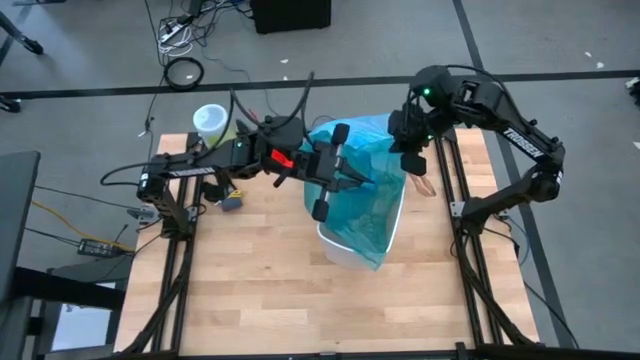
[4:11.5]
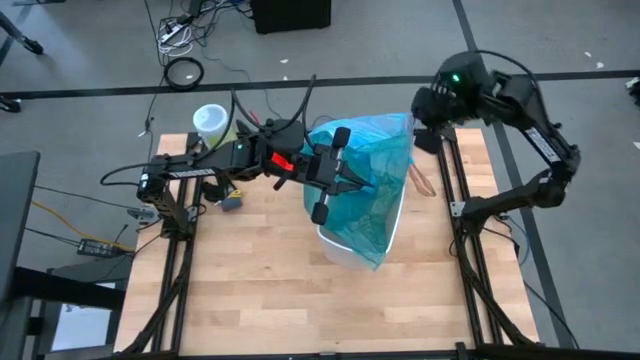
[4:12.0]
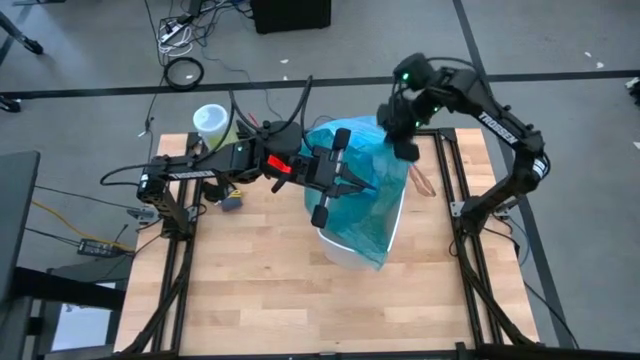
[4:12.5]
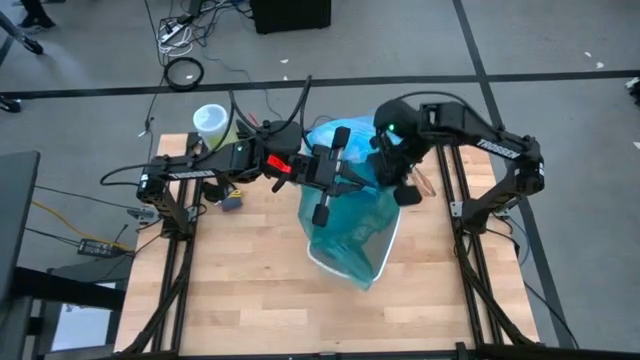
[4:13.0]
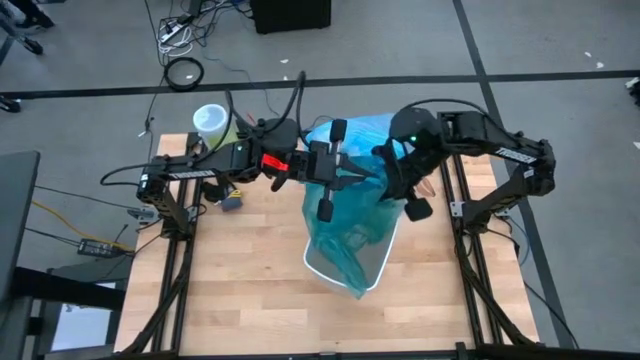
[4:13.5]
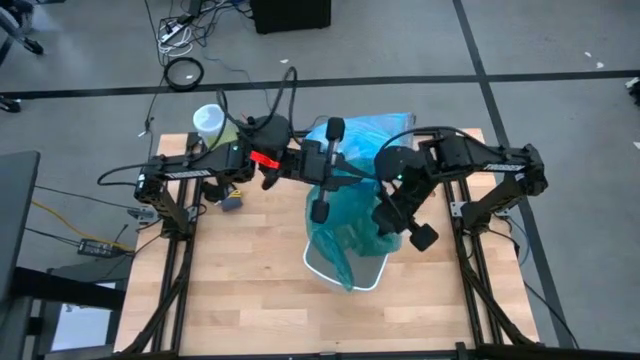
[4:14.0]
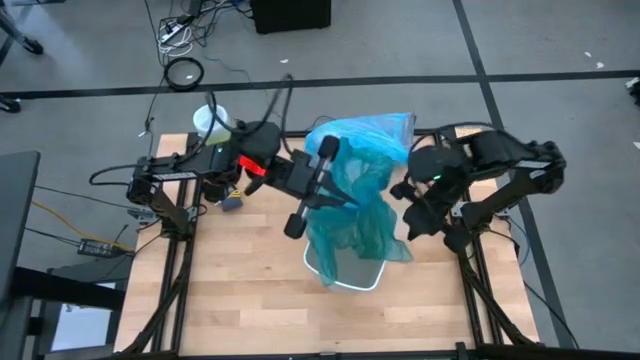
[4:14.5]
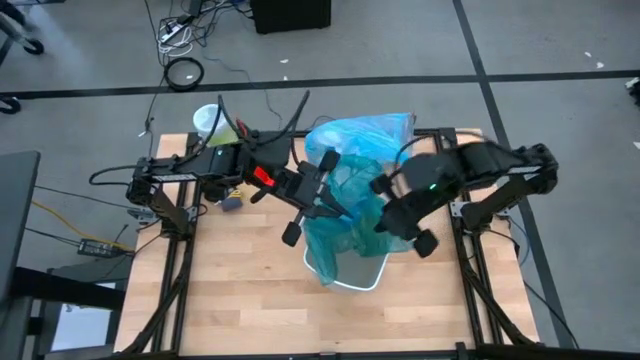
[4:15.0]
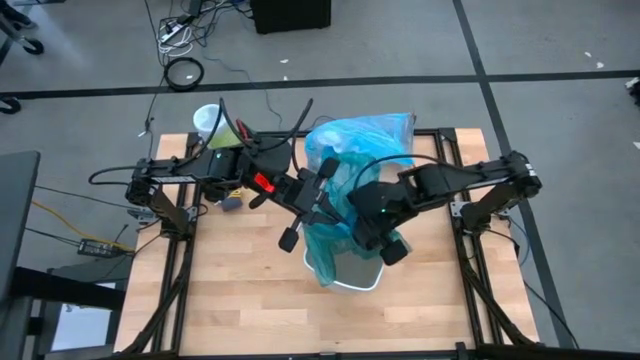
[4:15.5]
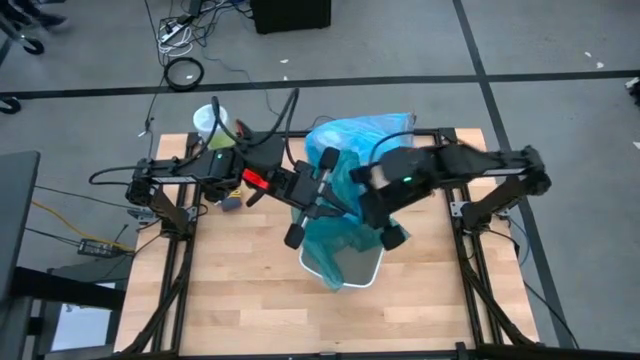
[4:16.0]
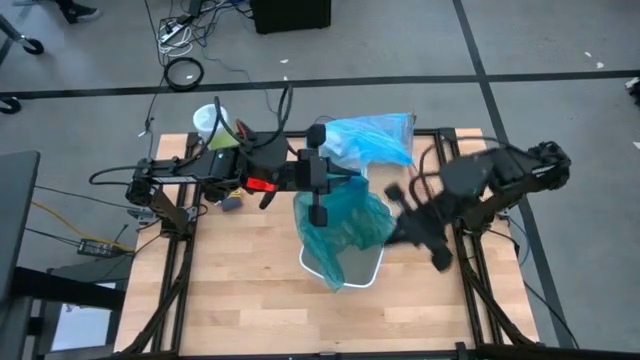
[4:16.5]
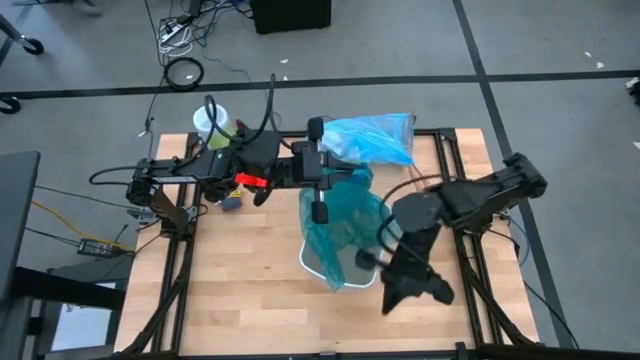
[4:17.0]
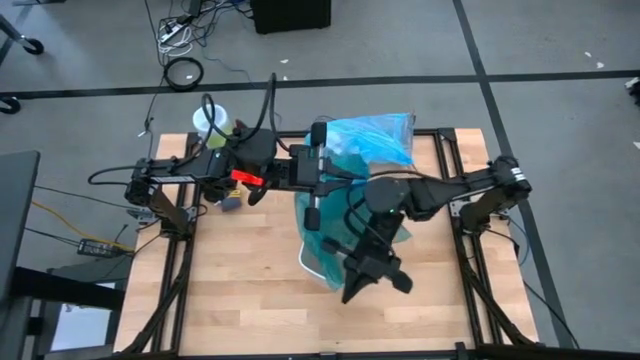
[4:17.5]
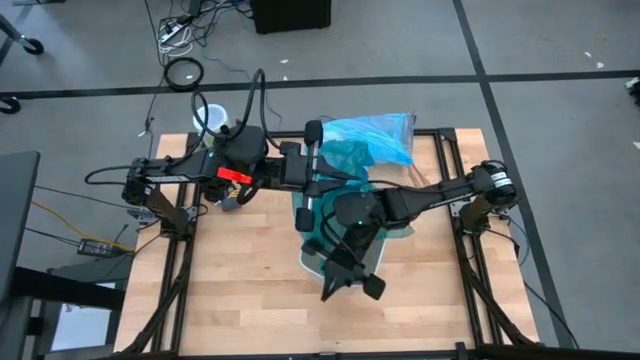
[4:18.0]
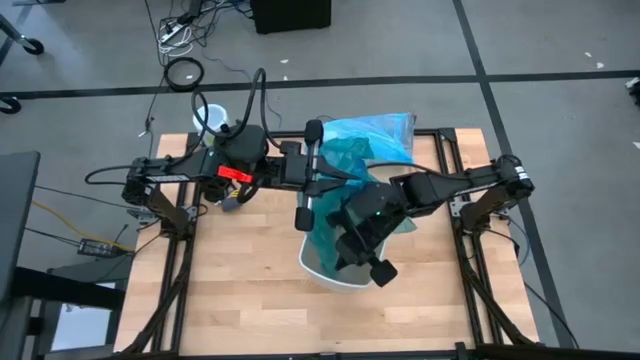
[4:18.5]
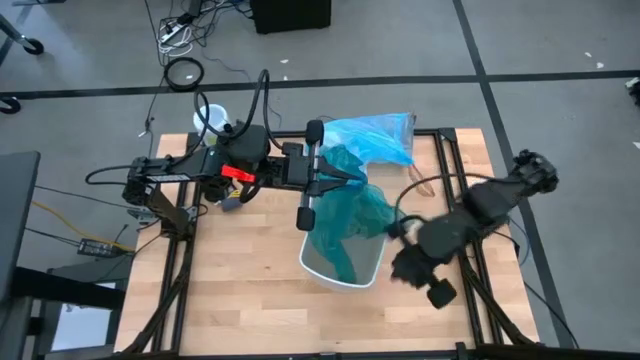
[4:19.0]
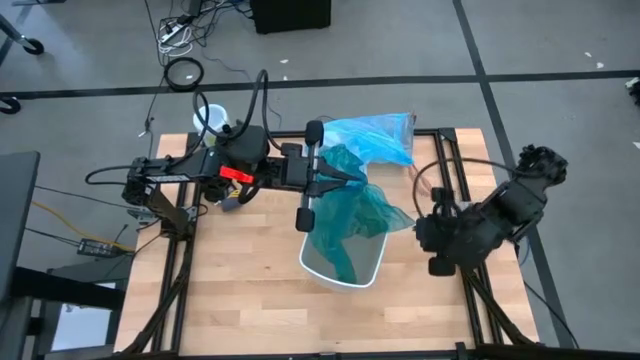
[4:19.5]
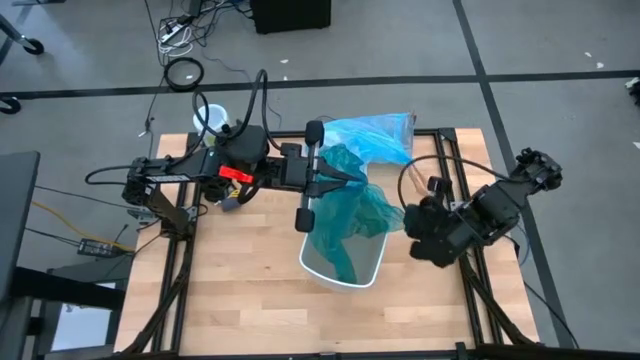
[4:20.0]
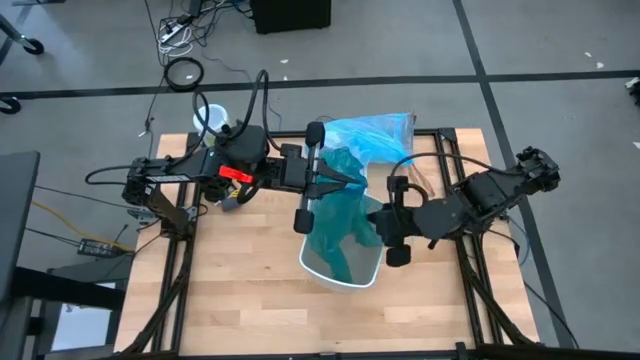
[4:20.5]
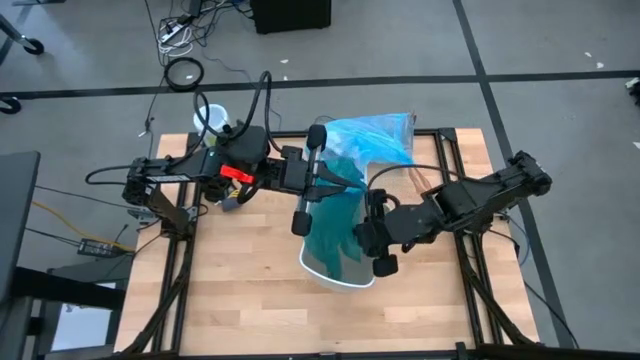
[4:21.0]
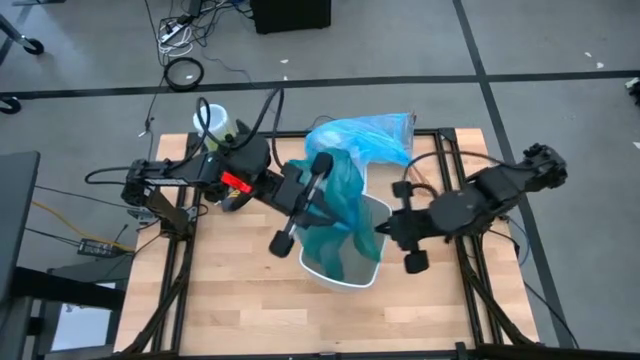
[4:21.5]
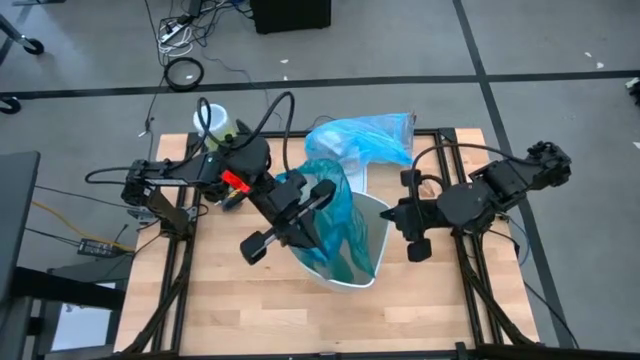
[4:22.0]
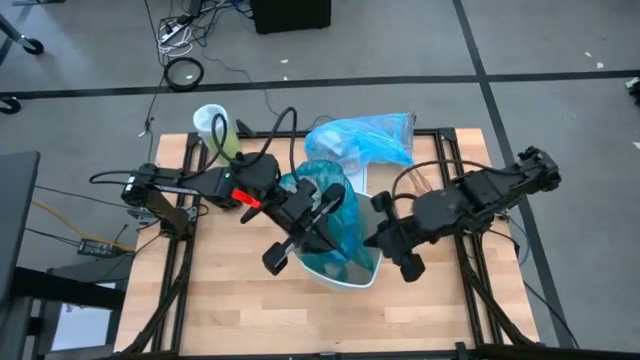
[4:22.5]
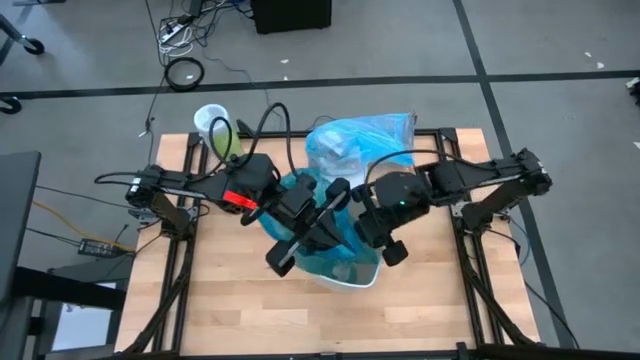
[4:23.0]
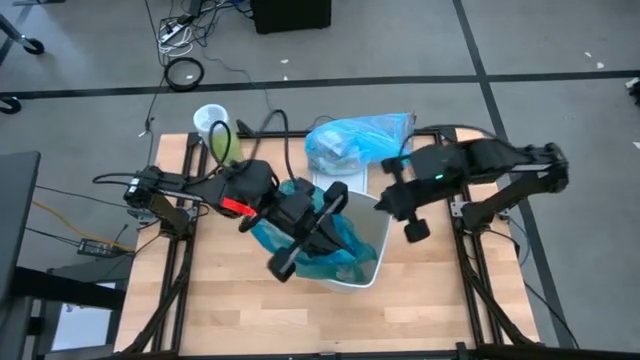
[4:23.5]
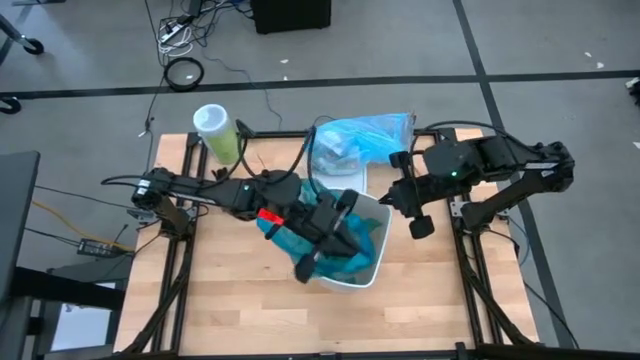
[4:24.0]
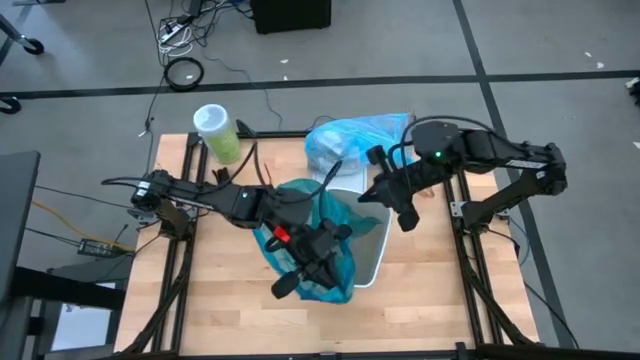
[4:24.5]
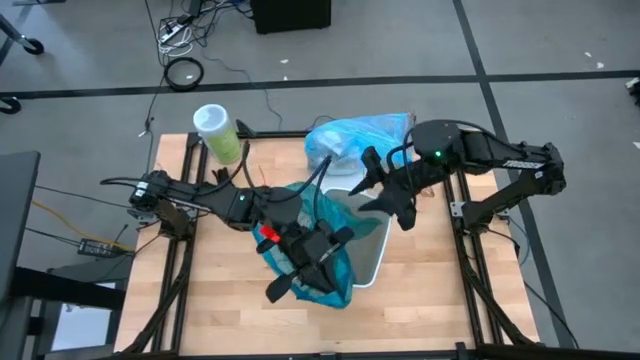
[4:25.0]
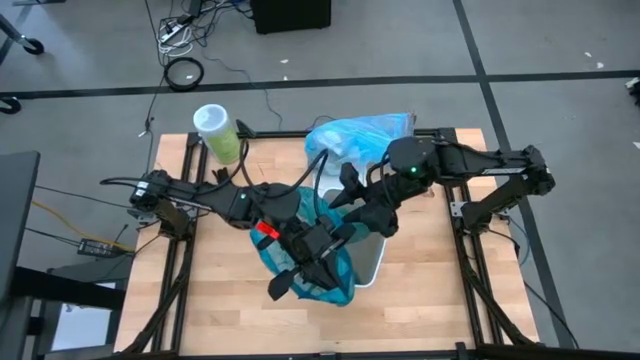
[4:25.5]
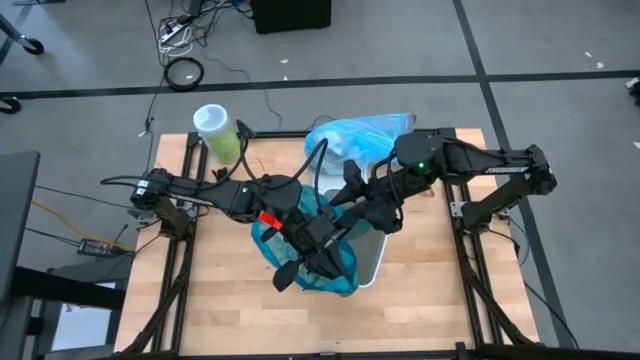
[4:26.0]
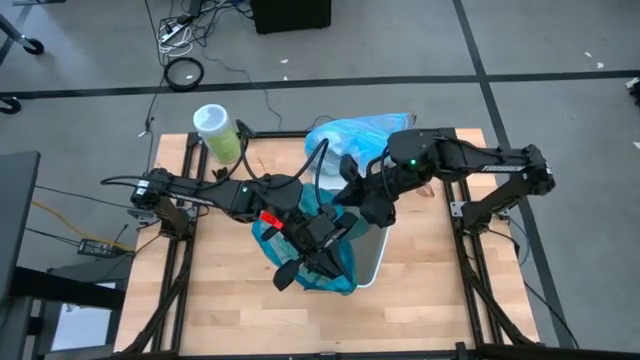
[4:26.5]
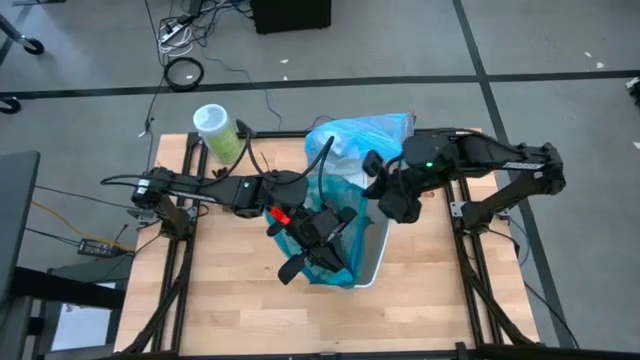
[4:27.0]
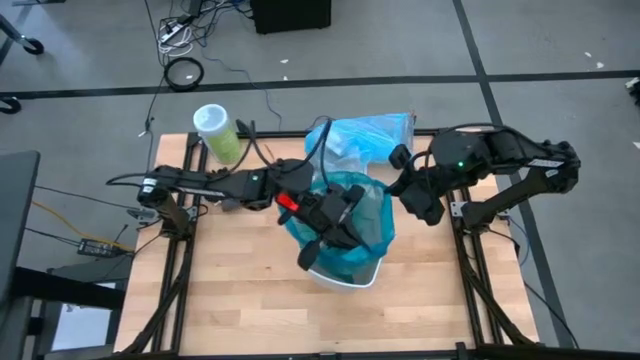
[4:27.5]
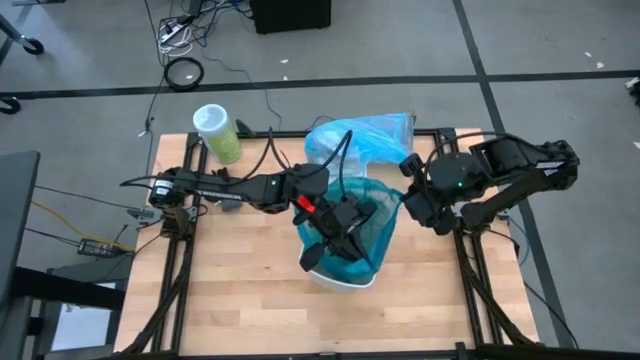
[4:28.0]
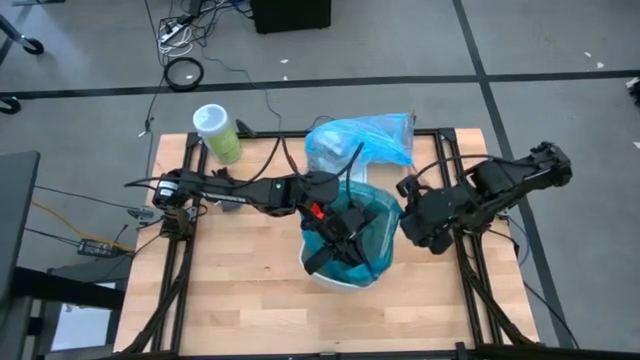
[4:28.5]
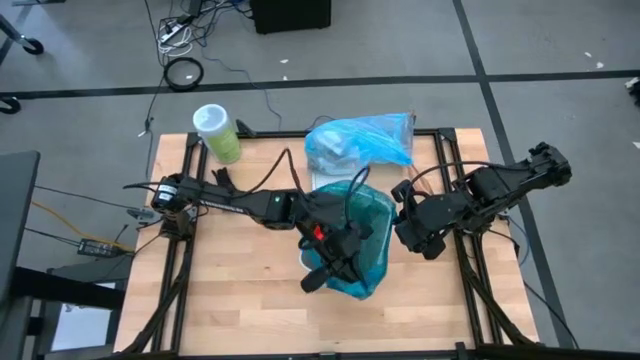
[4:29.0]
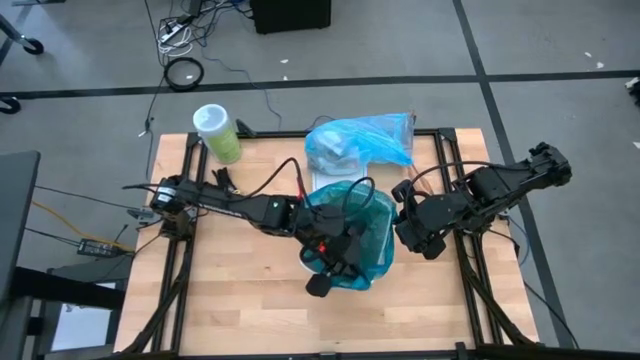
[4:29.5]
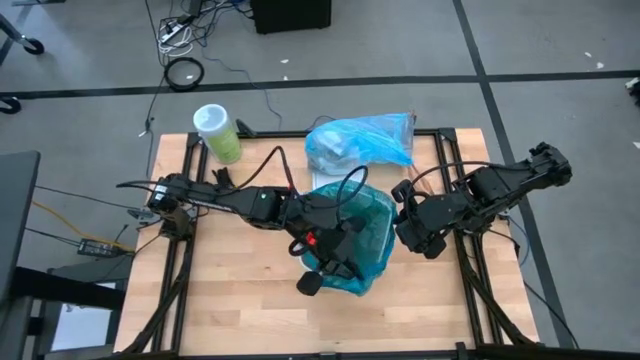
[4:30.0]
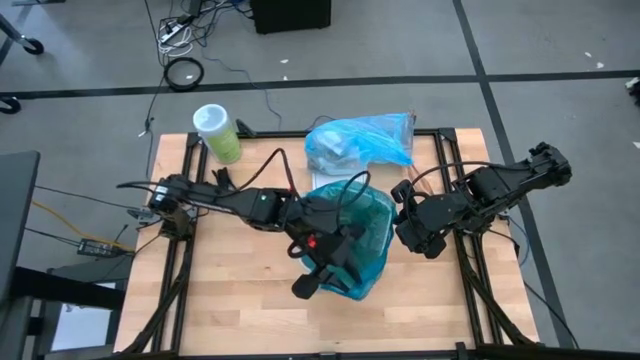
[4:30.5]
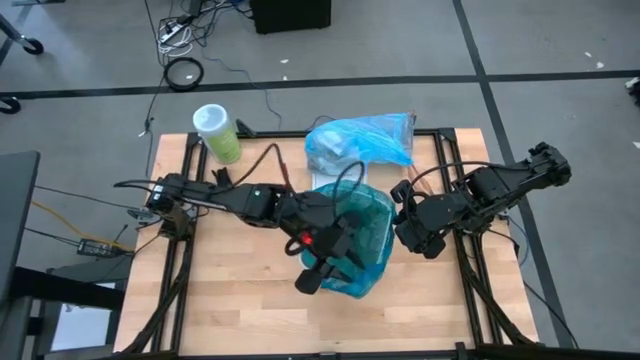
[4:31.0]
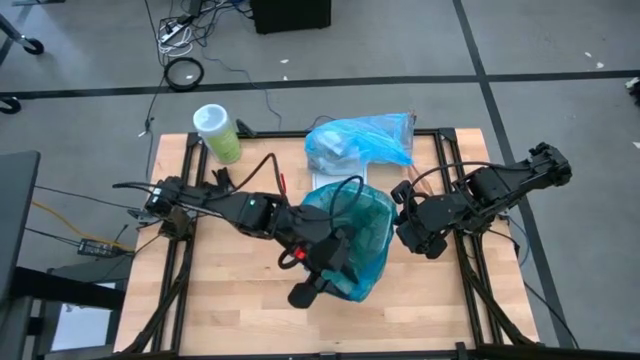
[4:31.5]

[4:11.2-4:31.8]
Task: place trash/remove bag and relplace
Insert the blue trash bag into the white trash bin
